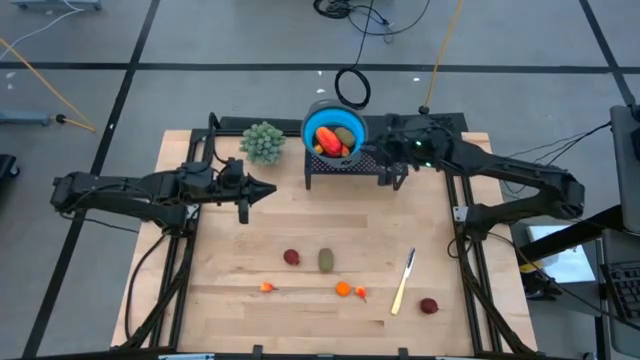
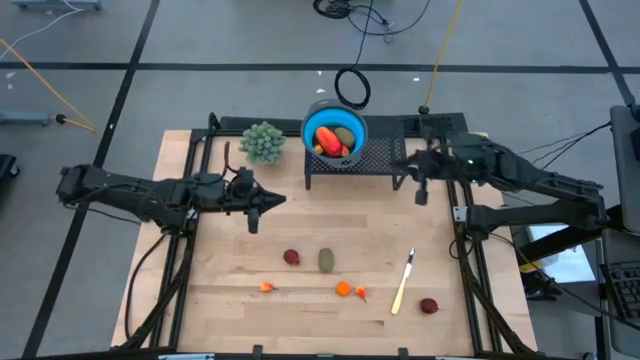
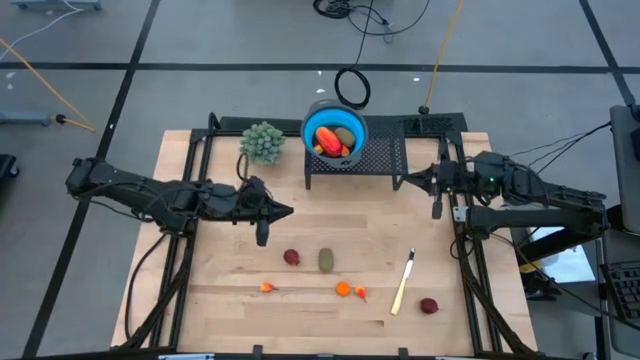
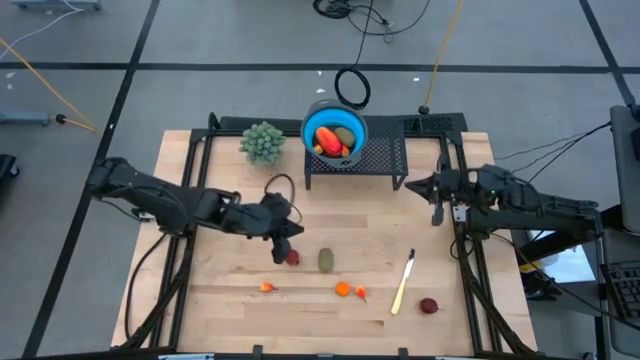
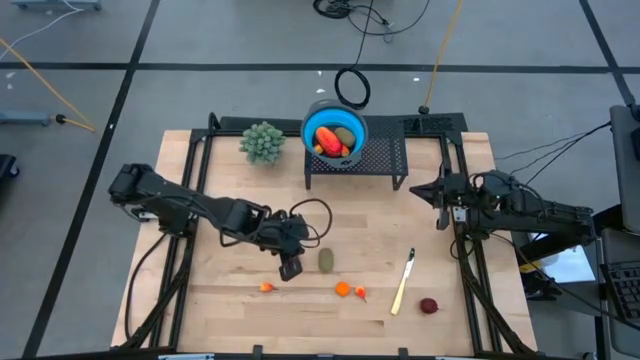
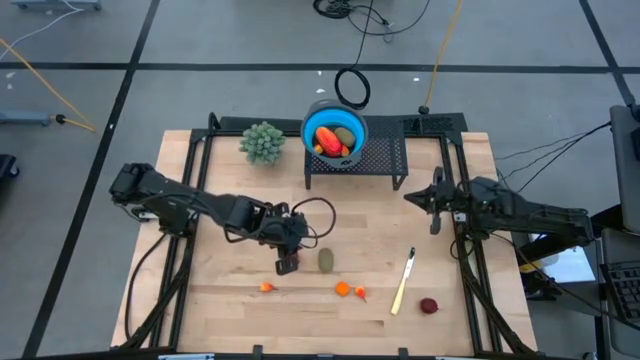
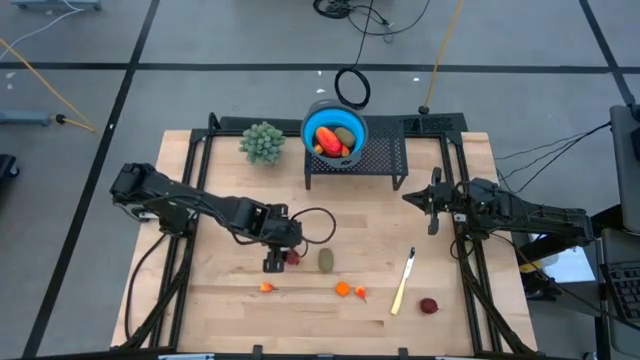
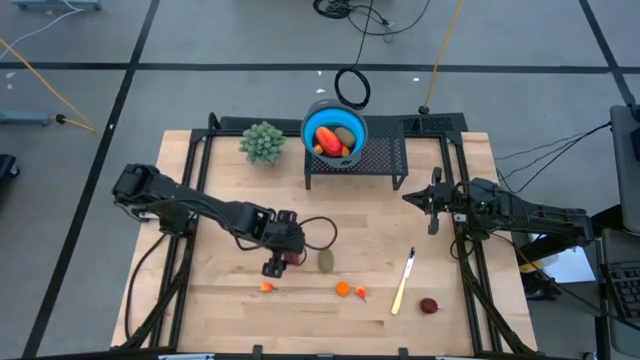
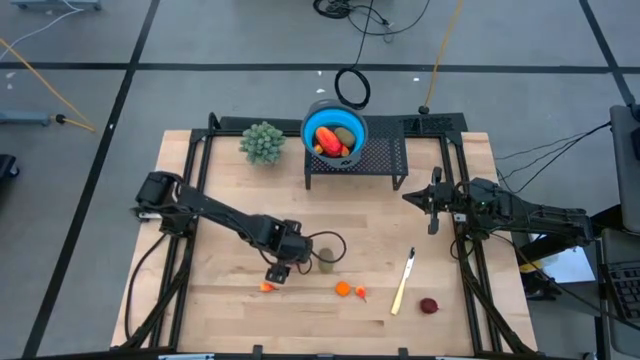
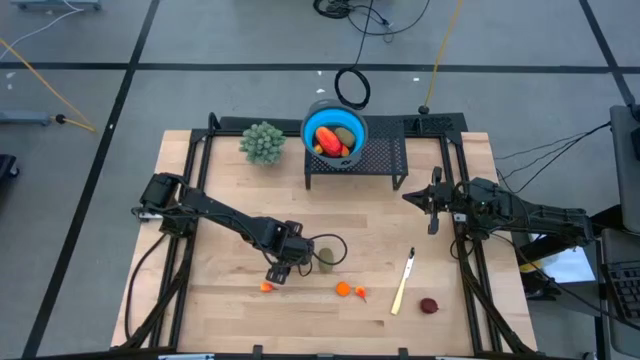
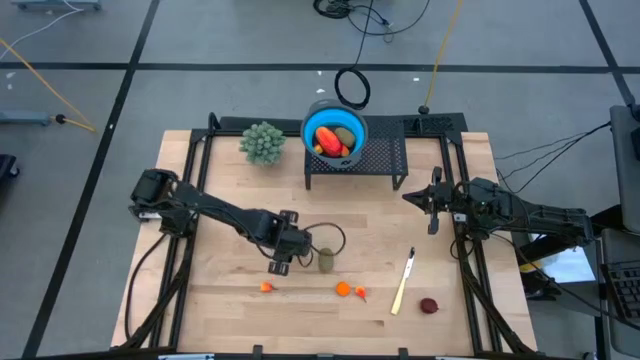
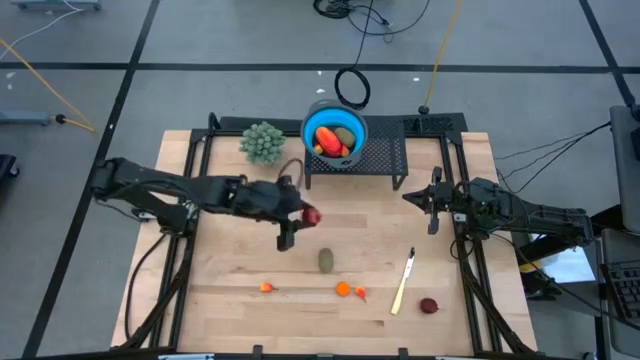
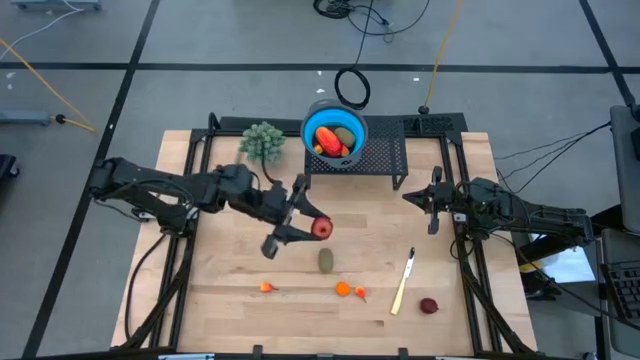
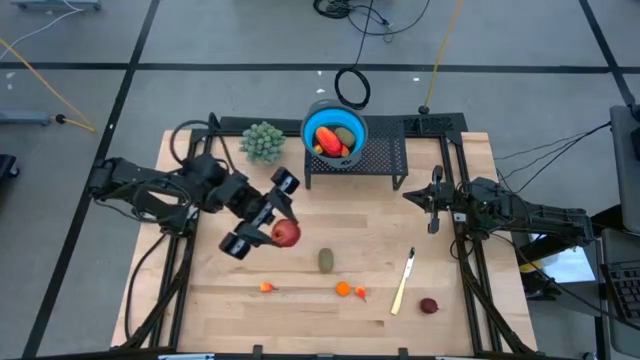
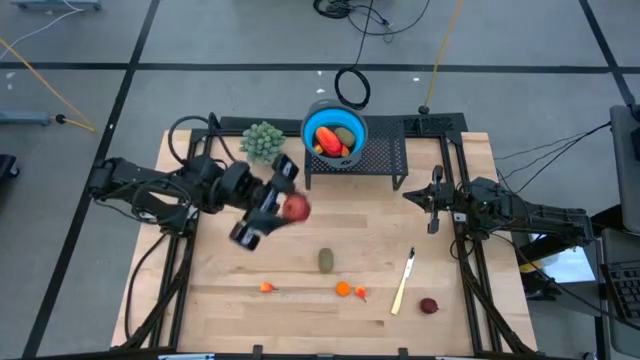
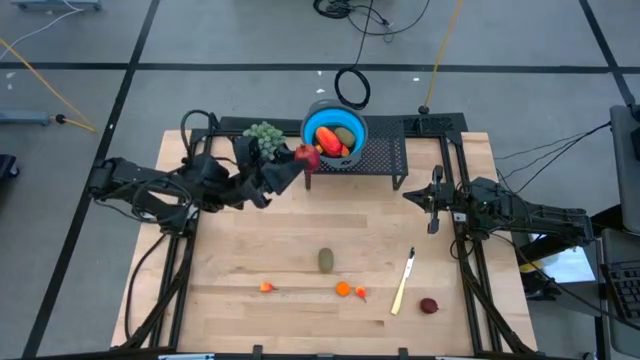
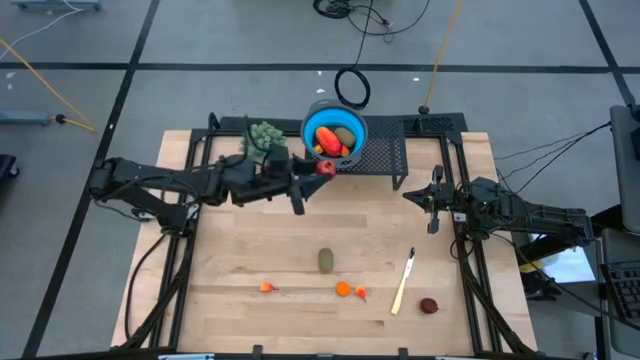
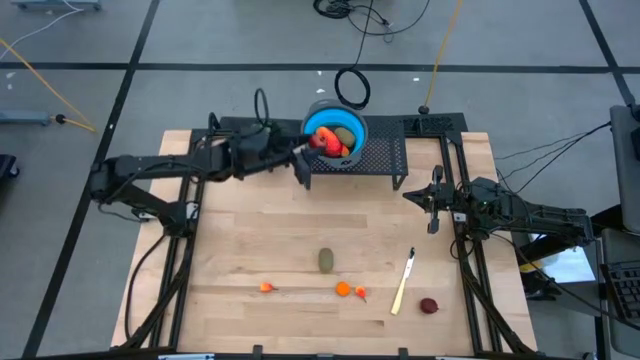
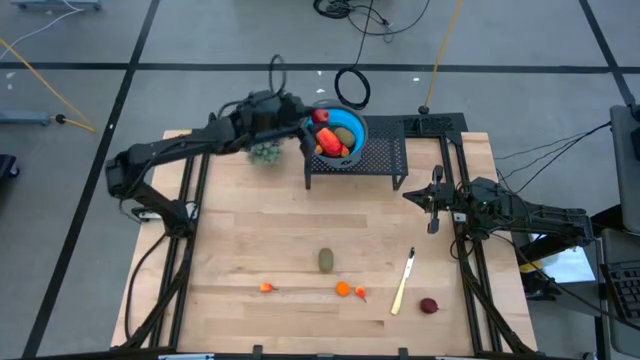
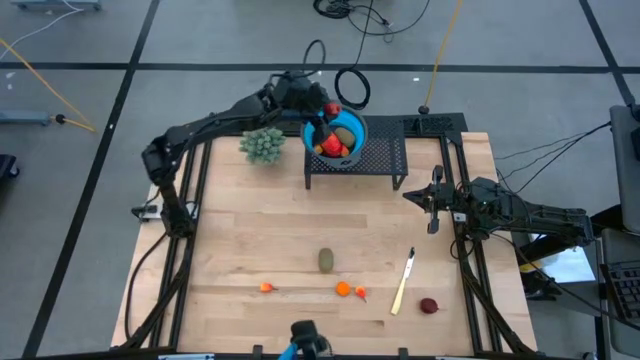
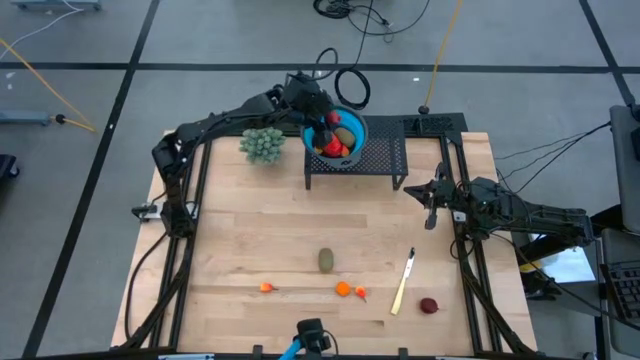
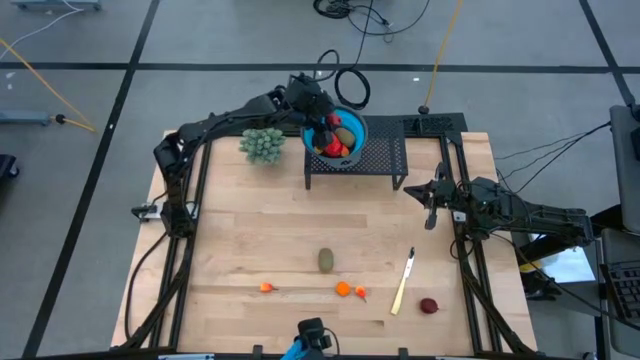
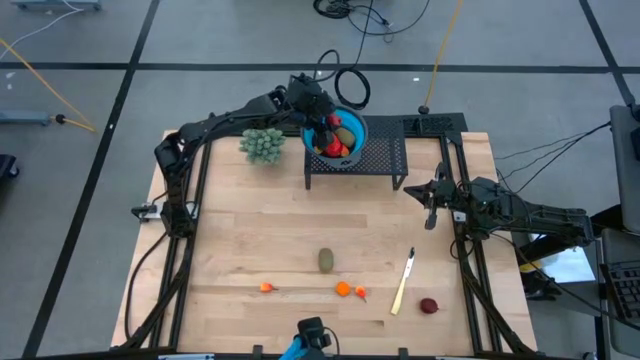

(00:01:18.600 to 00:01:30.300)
Task: Pick & Place Fruit
Put the pomegranate into the blue strainer on the shelf

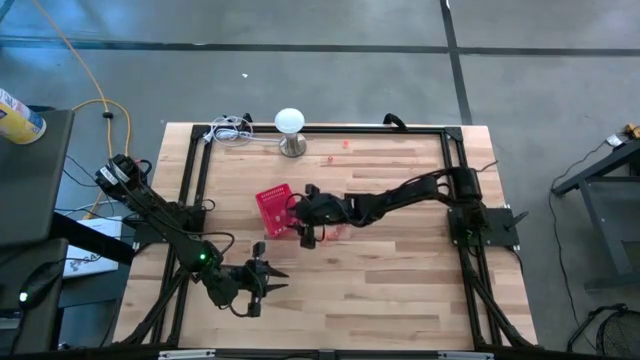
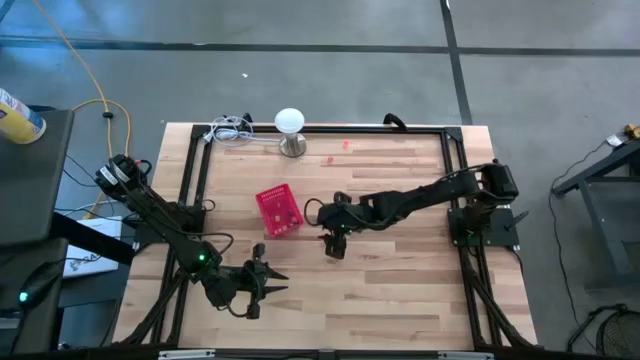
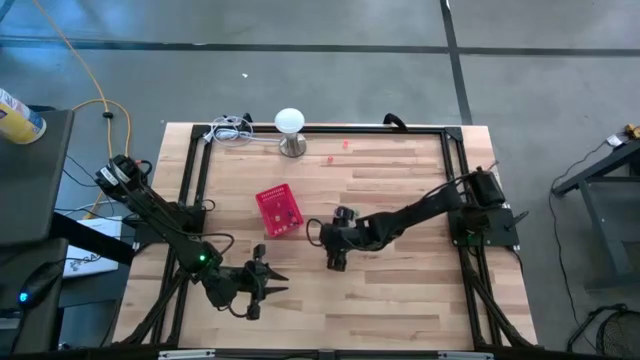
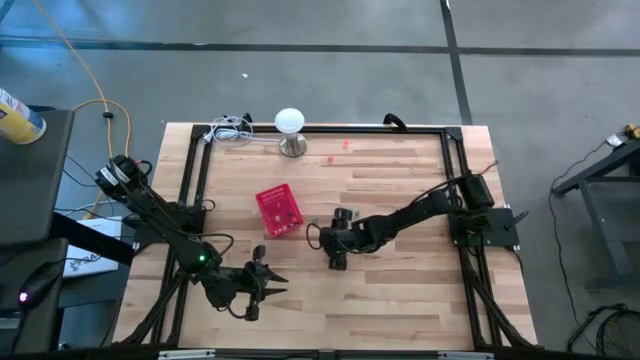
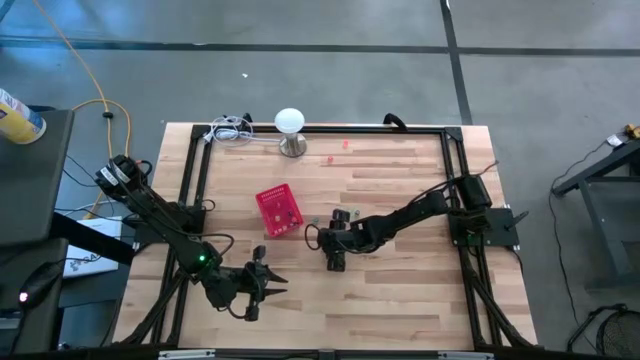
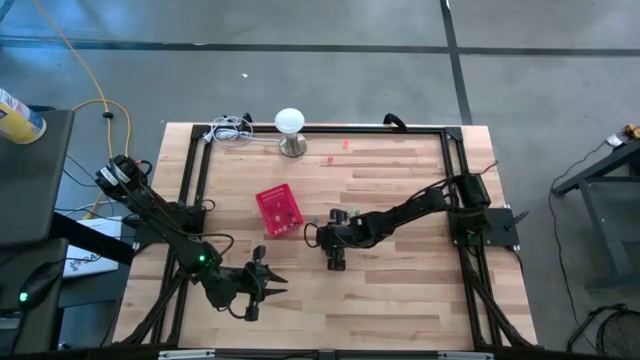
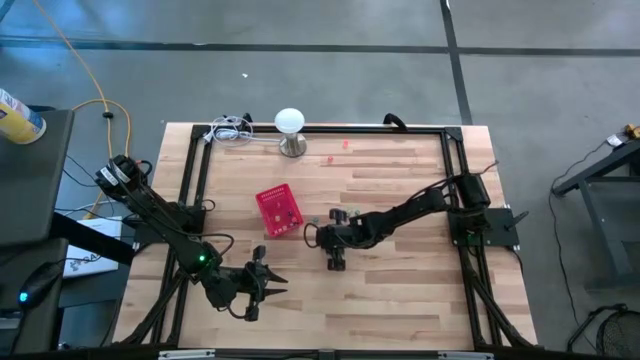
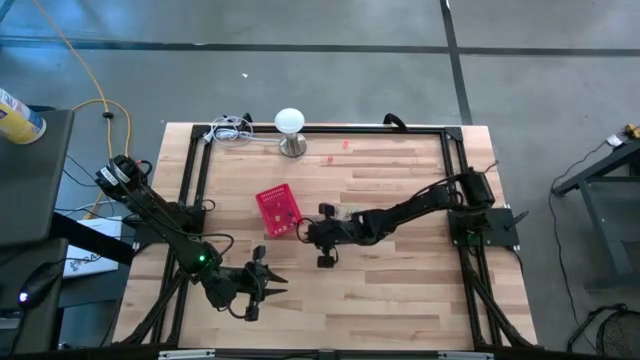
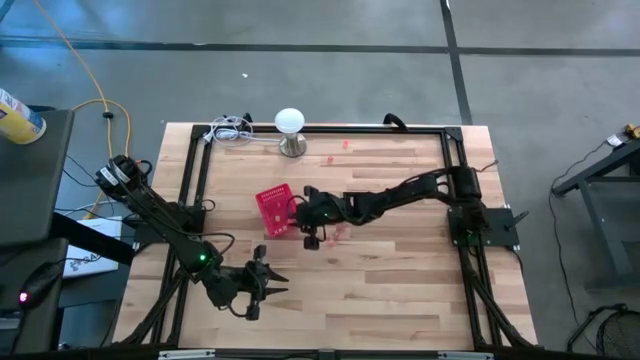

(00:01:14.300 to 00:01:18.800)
Task: Pick & Place Dice
Put the orange die into the red basket
